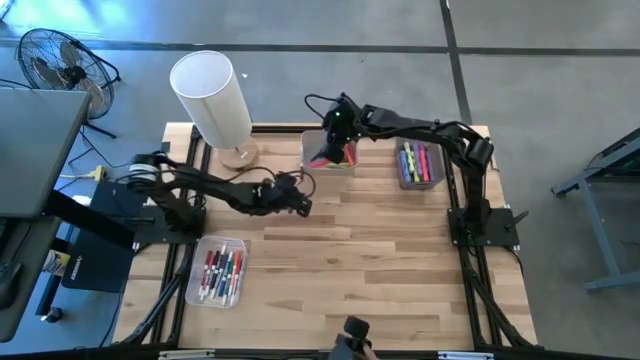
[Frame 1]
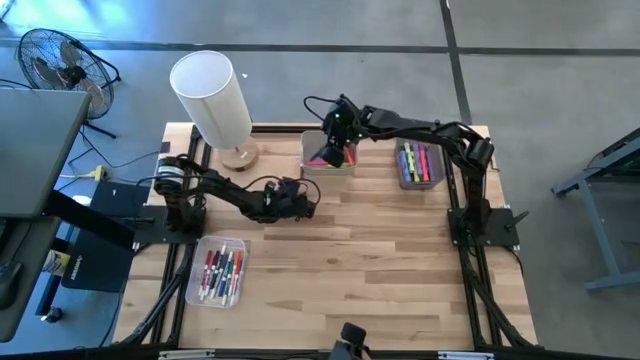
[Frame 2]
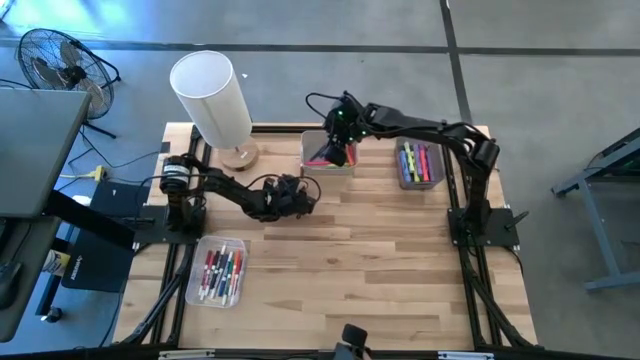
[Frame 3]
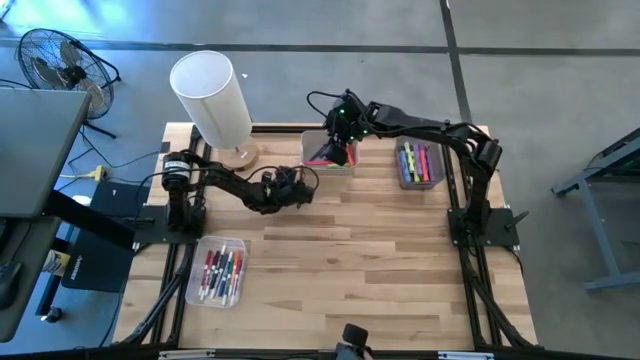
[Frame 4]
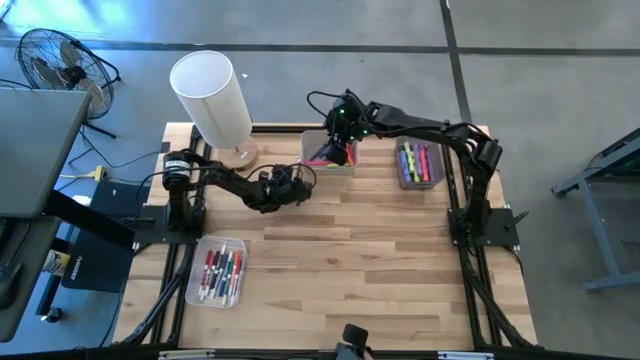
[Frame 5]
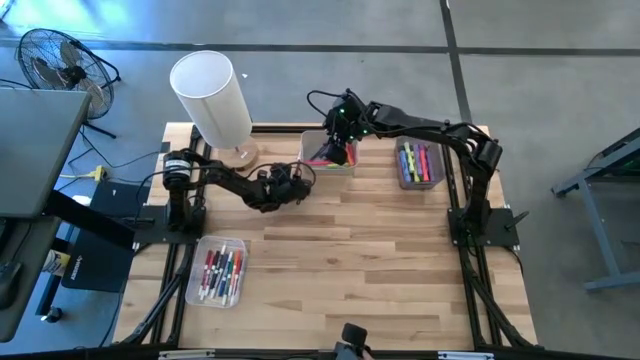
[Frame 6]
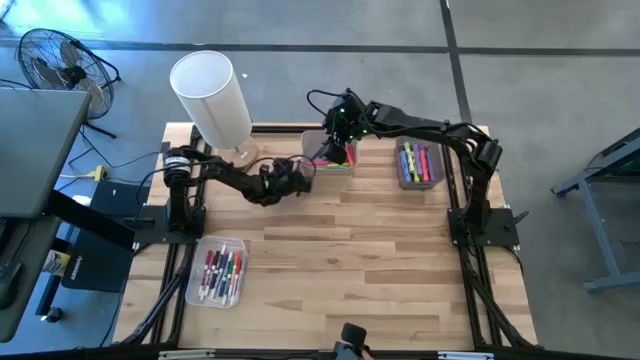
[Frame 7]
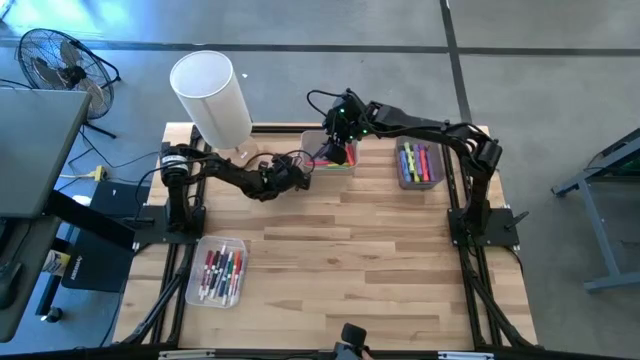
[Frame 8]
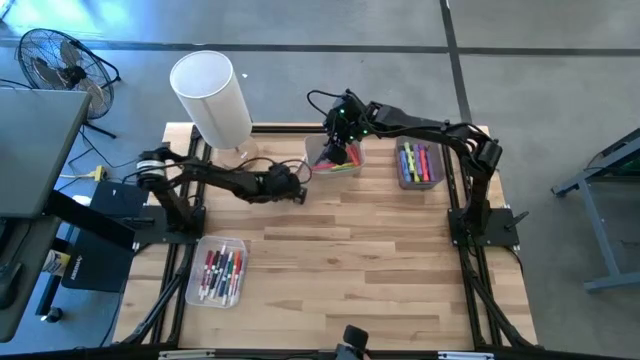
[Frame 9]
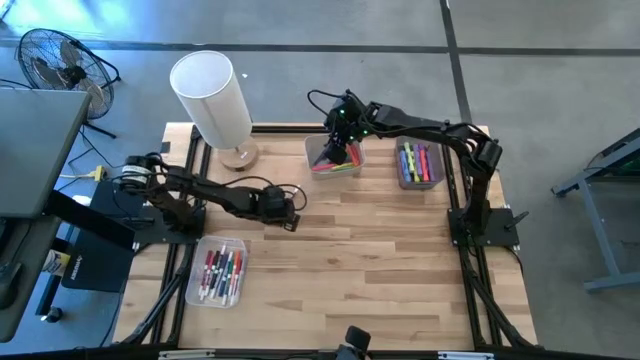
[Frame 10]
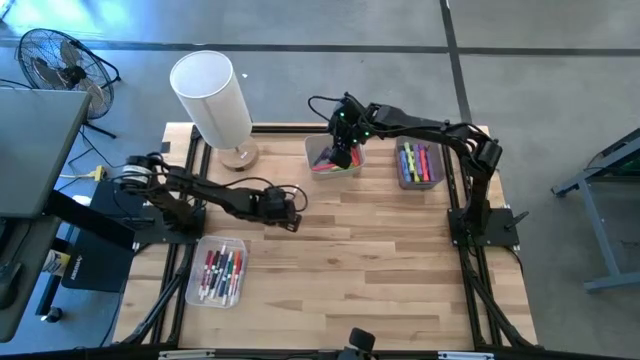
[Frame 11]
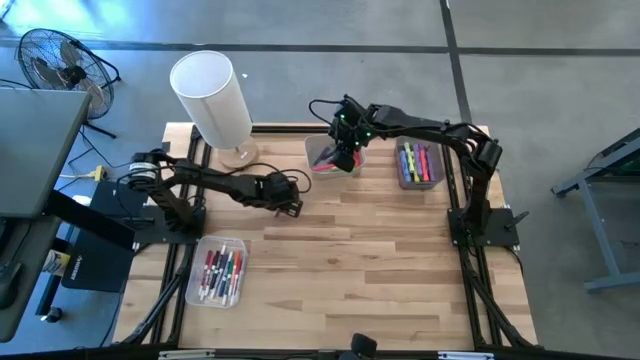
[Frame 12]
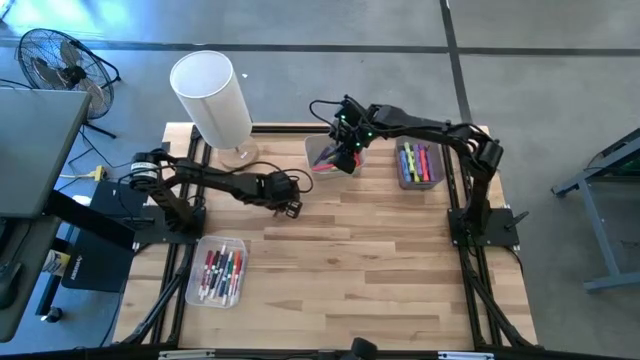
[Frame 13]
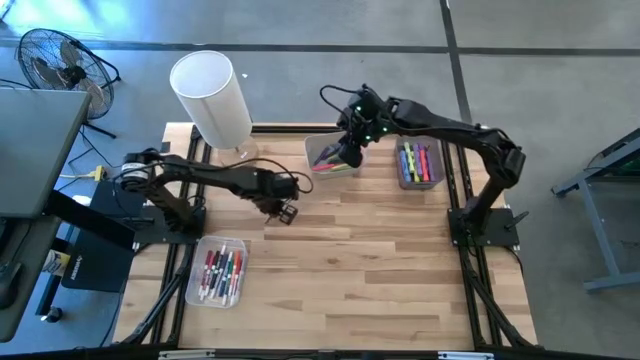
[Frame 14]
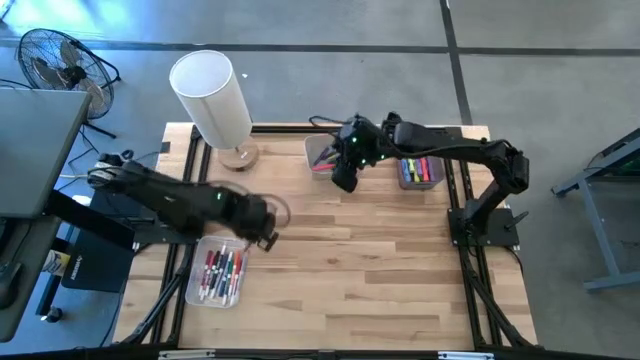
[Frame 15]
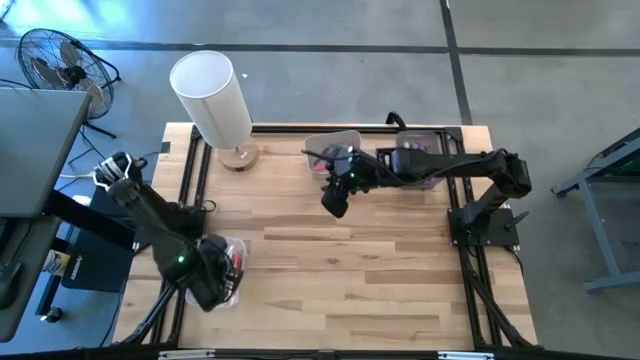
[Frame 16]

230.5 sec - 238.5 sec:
Task: Pick & Place Markers
Put the brown marker pen into the transparent bin

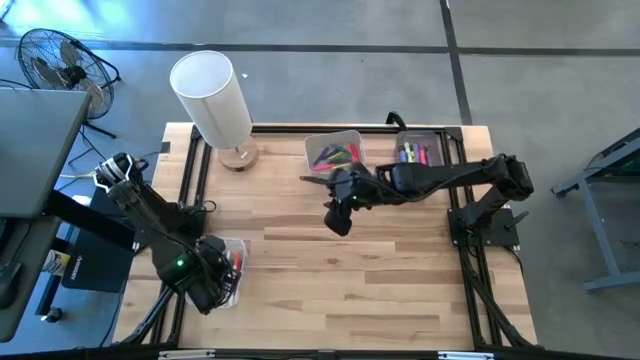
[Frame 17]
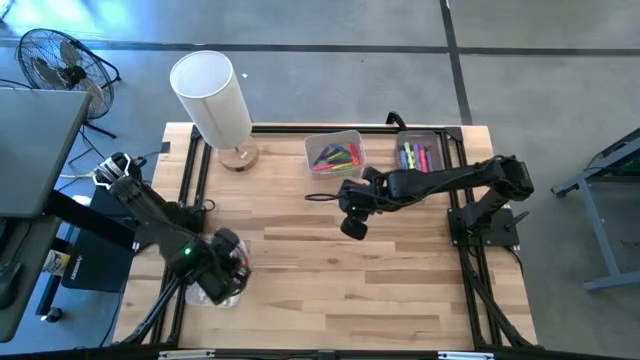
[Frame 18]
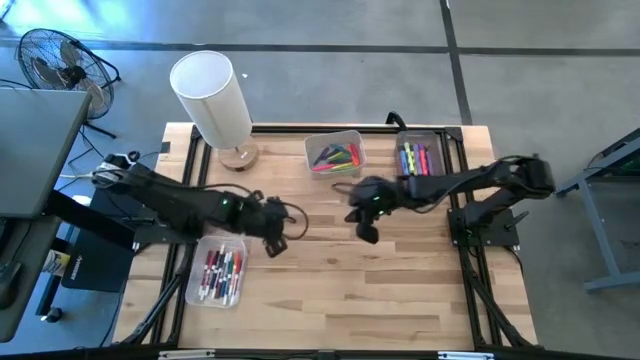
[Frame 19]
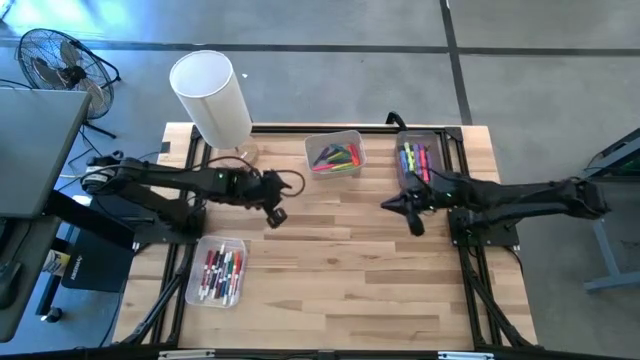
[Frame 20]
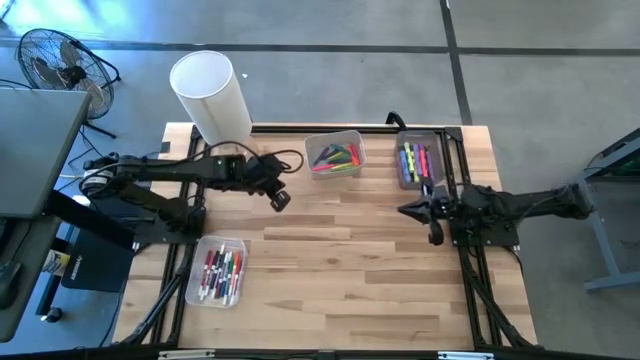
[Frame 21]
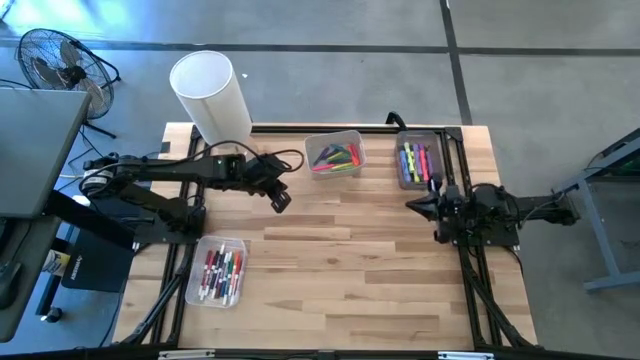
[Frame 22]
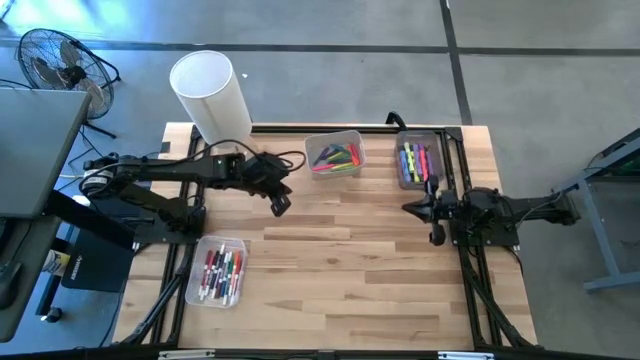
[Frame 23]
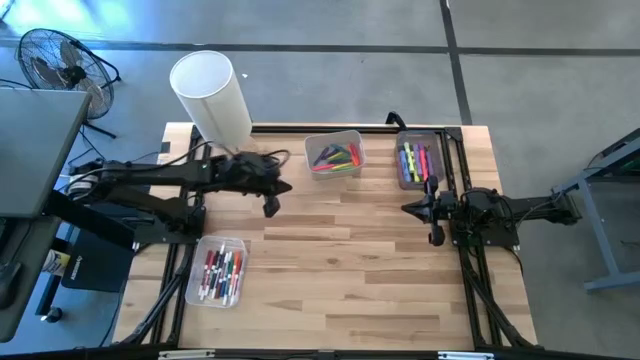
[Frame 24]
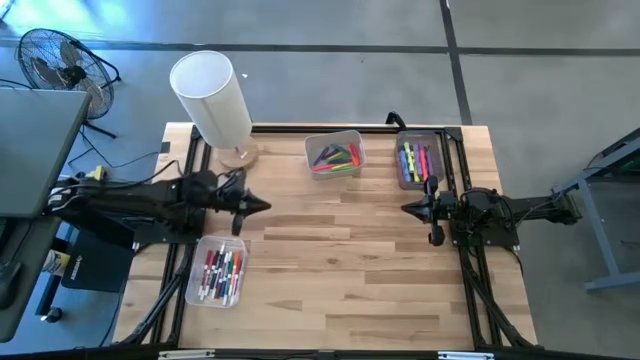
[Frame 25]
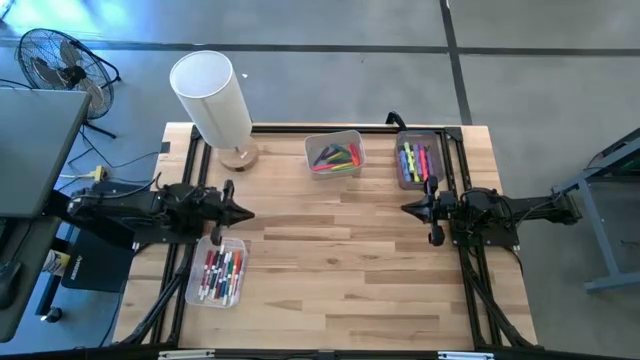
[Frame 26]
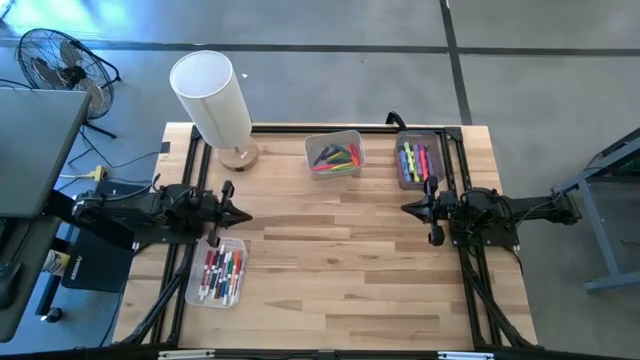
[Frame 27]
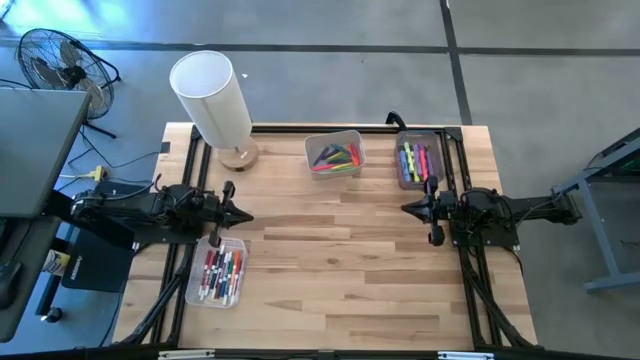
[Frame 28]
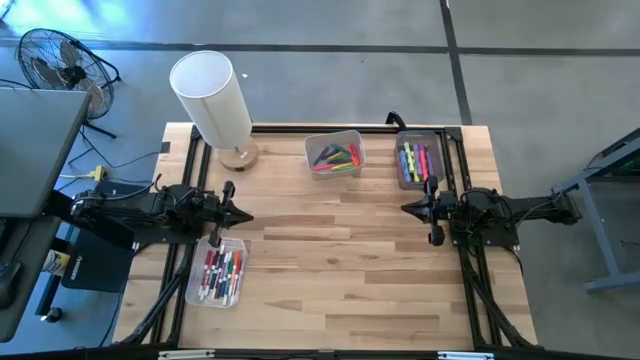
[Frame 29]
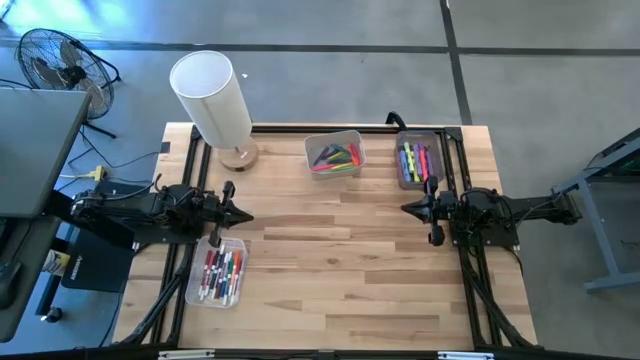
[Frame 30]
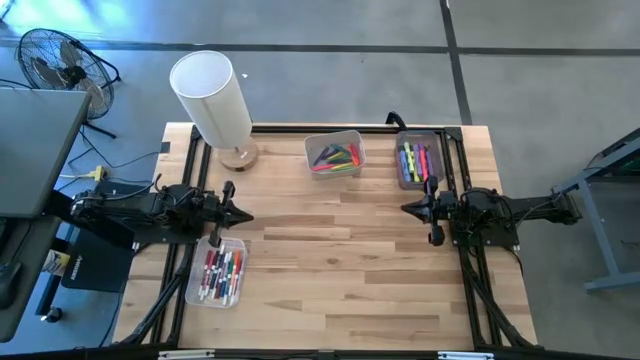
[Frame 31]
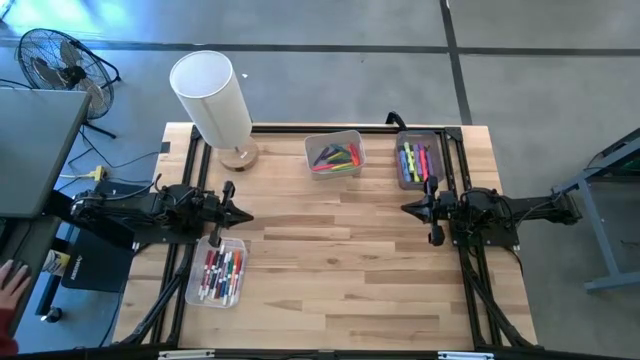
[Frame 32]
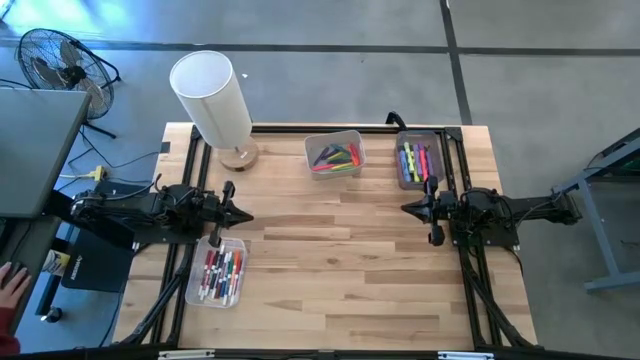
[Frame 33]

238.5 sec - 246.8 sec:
Return to Home Position

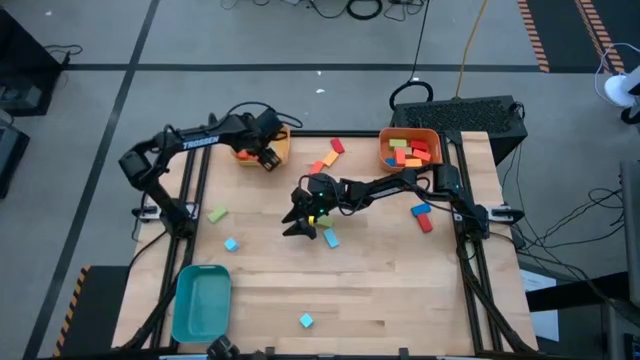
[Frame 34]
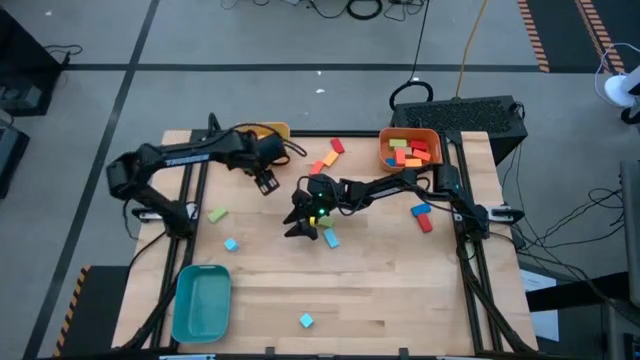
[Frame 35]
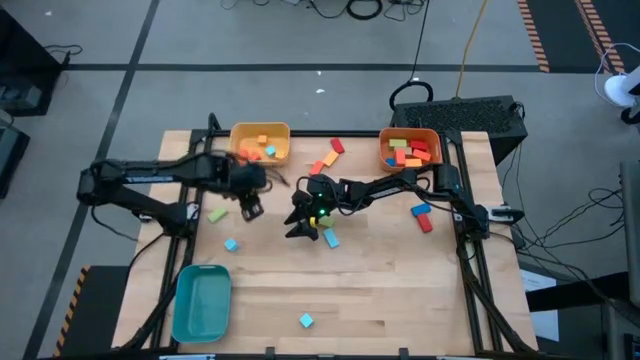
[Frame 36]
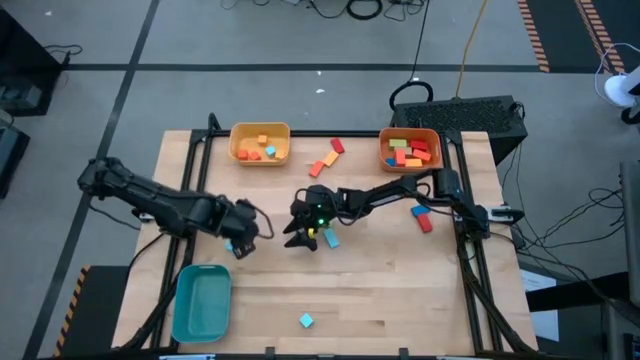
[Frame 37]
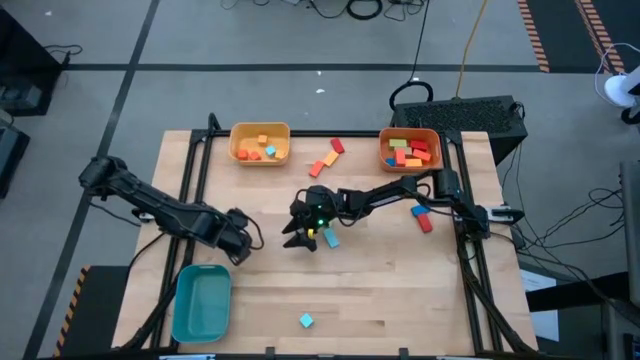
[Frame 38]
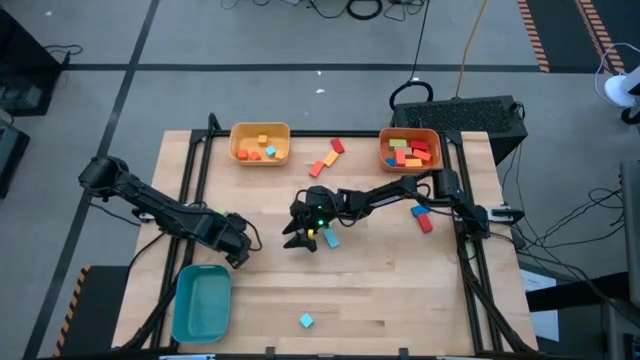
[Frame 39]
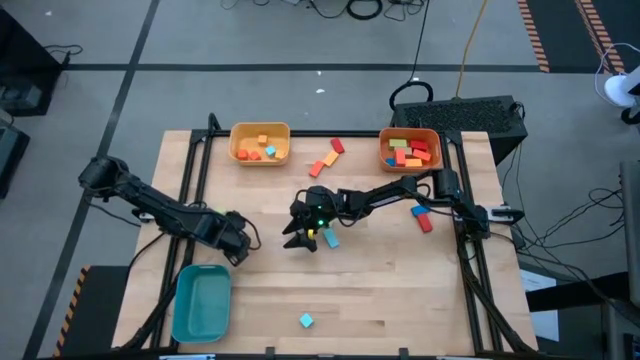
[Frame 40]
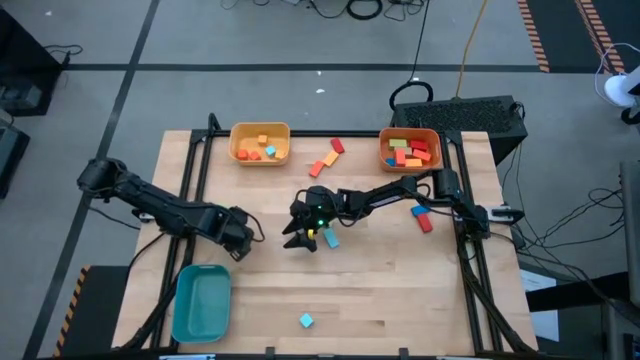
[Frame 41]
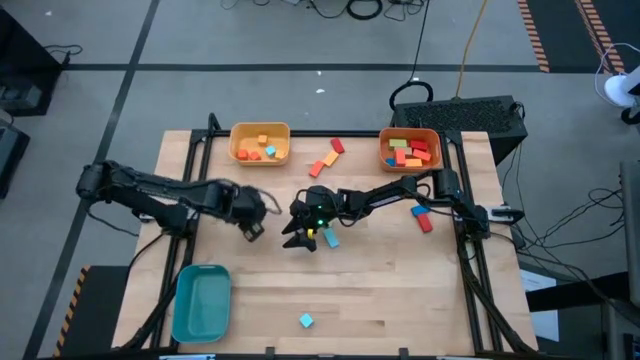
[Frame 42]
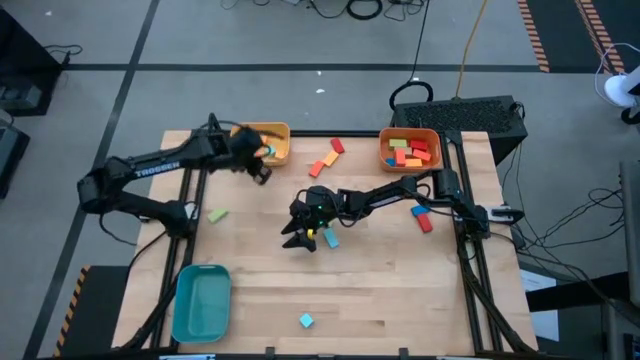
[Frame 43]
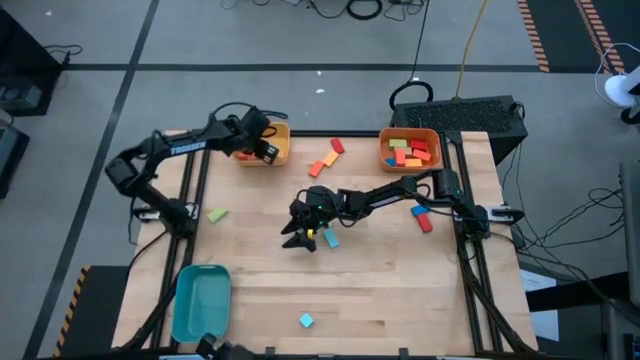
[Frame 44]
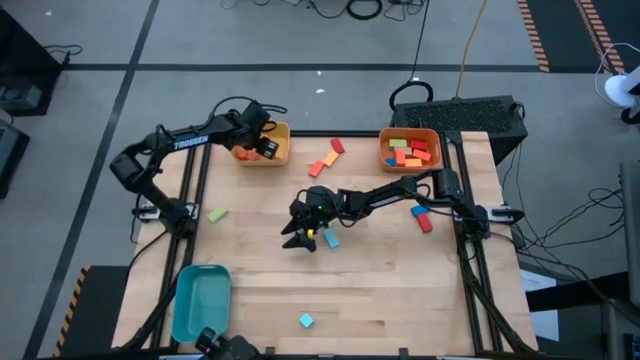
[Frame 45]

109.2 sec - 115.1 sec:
Task: Sort blocks by size
Put the small light blue block into the yellow bin
